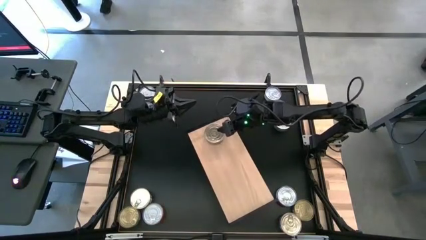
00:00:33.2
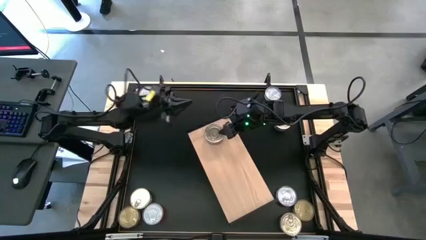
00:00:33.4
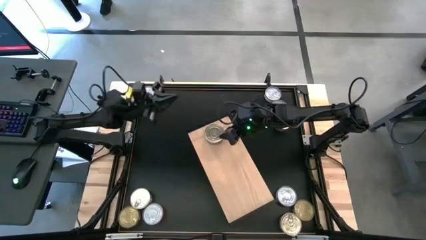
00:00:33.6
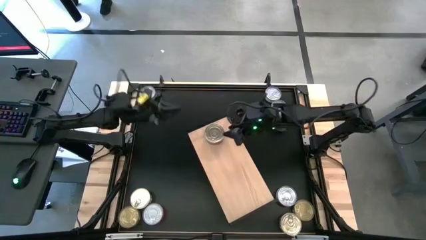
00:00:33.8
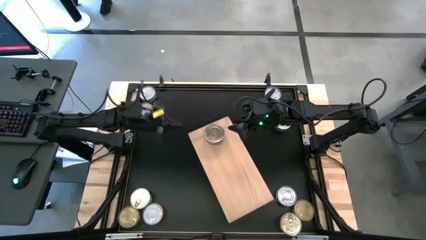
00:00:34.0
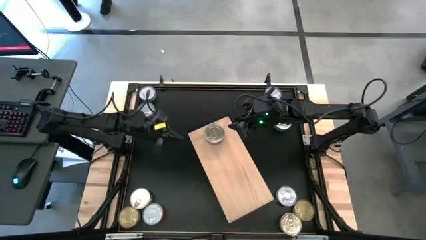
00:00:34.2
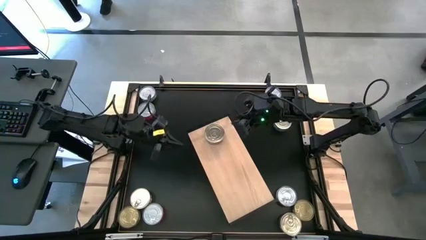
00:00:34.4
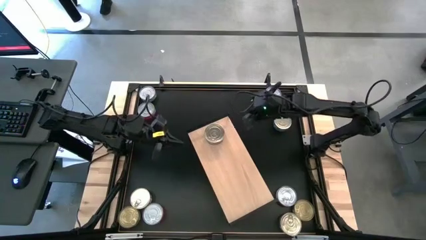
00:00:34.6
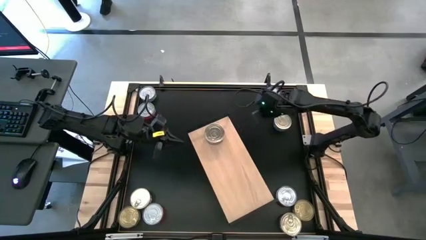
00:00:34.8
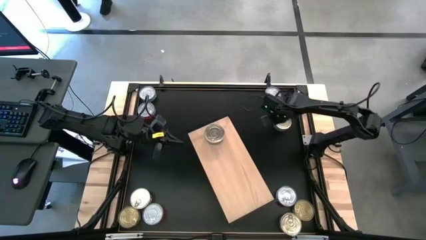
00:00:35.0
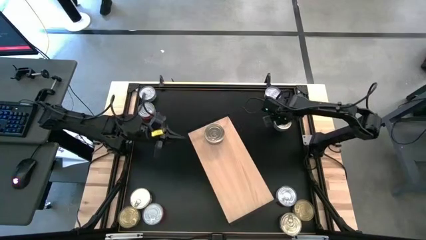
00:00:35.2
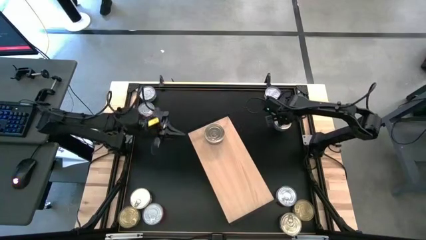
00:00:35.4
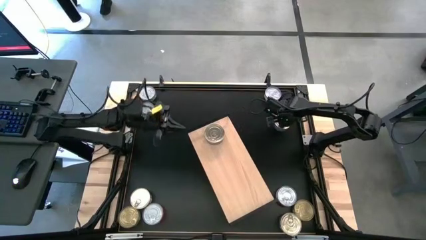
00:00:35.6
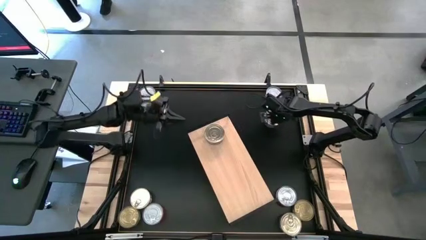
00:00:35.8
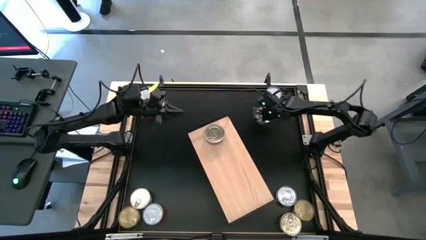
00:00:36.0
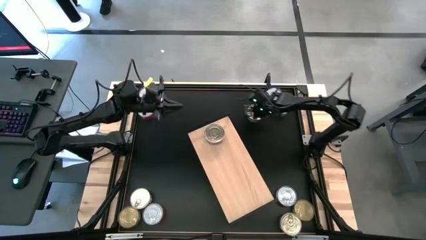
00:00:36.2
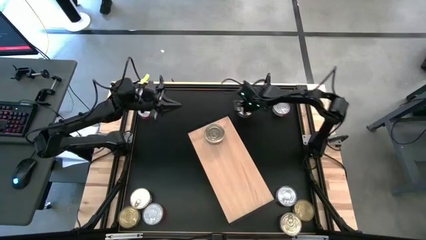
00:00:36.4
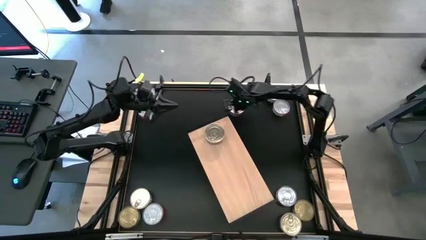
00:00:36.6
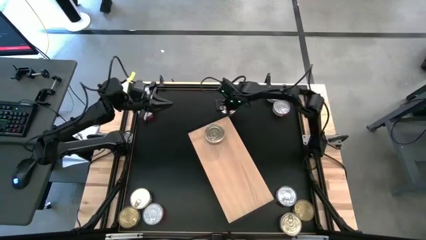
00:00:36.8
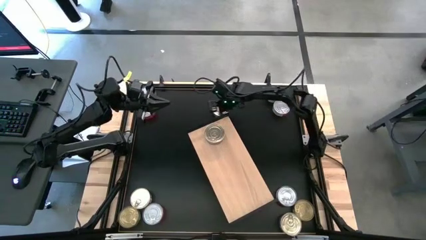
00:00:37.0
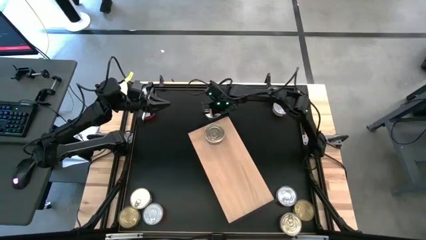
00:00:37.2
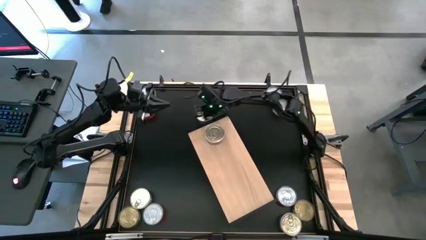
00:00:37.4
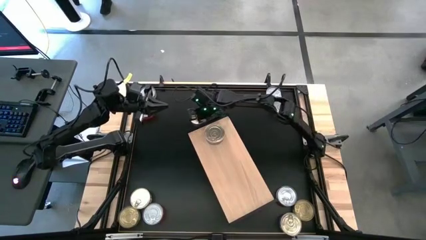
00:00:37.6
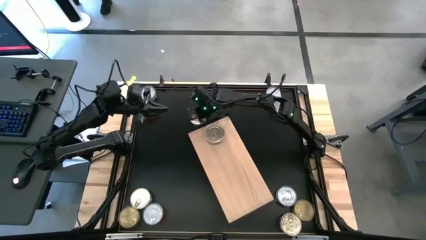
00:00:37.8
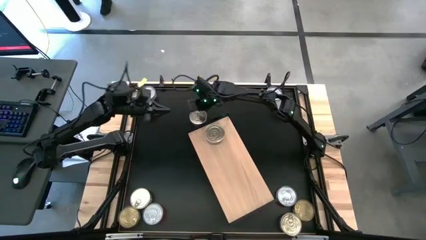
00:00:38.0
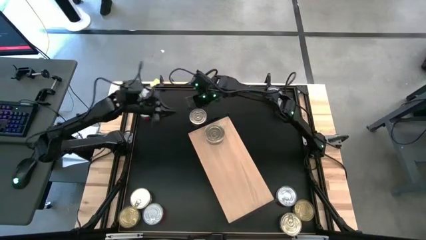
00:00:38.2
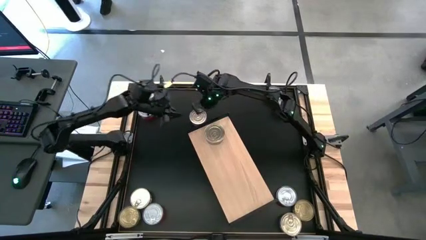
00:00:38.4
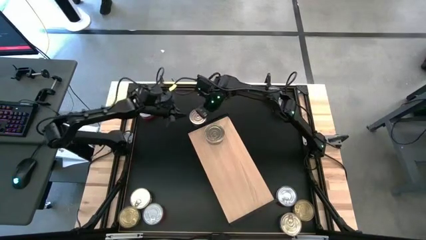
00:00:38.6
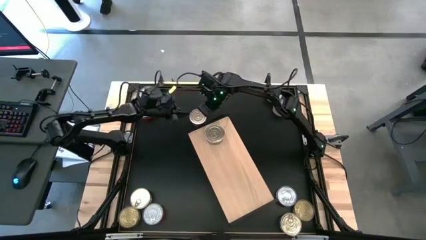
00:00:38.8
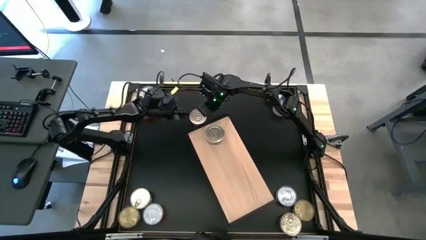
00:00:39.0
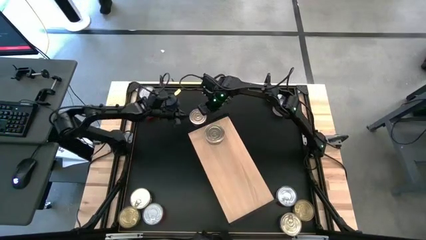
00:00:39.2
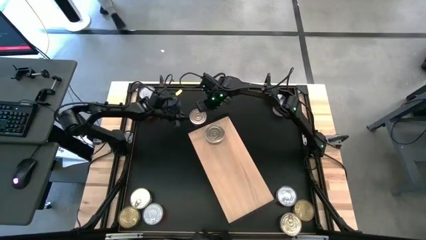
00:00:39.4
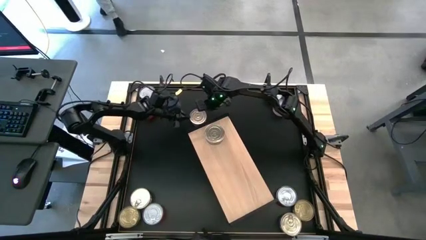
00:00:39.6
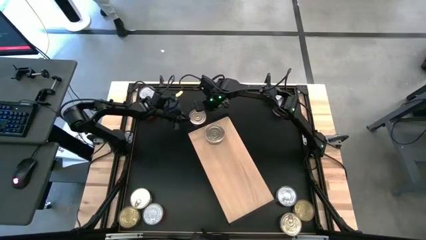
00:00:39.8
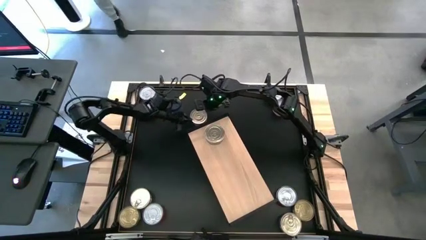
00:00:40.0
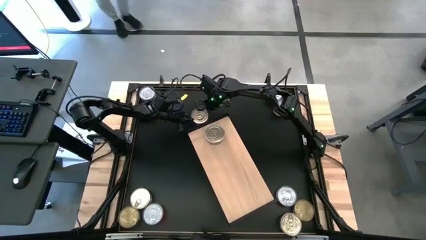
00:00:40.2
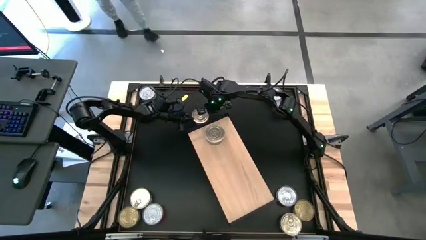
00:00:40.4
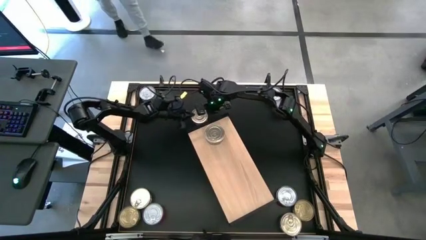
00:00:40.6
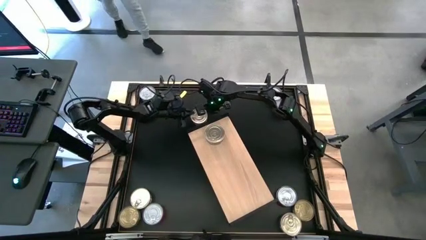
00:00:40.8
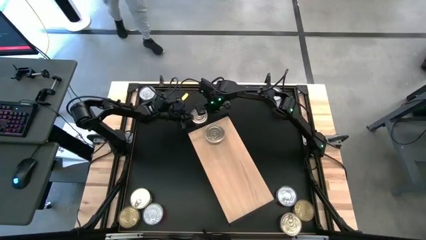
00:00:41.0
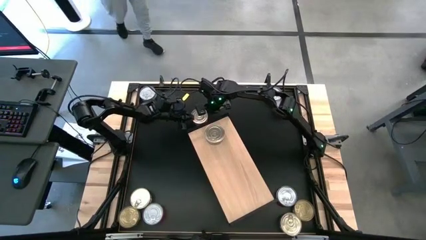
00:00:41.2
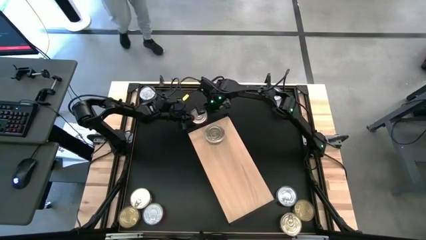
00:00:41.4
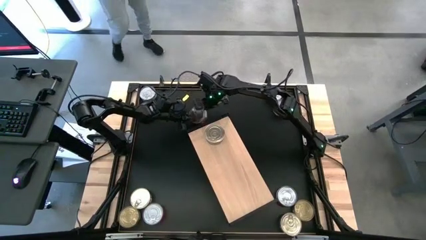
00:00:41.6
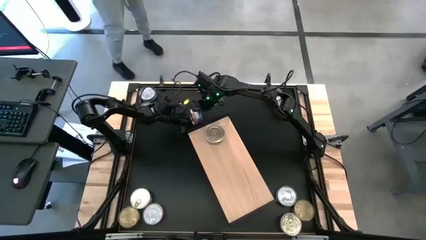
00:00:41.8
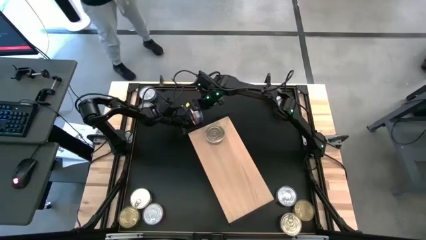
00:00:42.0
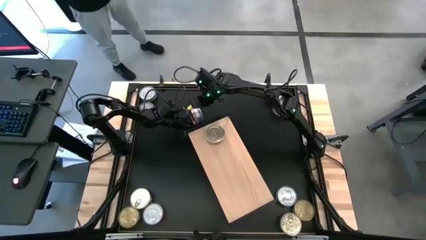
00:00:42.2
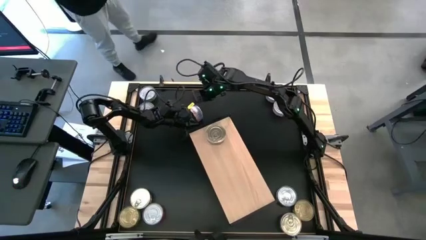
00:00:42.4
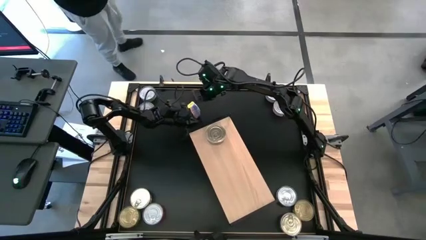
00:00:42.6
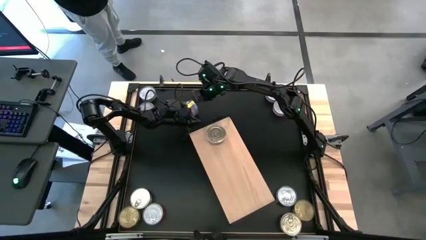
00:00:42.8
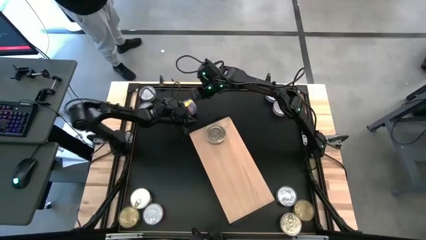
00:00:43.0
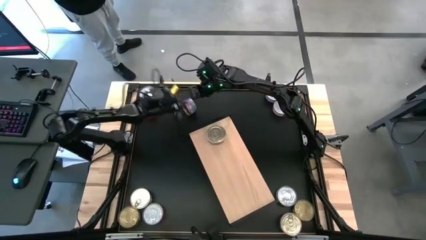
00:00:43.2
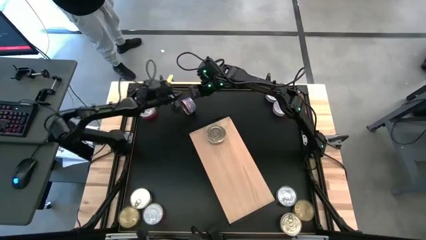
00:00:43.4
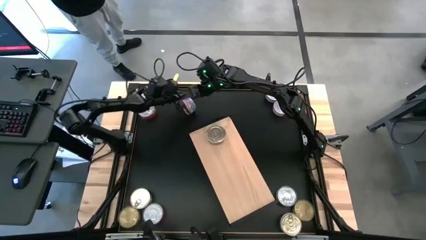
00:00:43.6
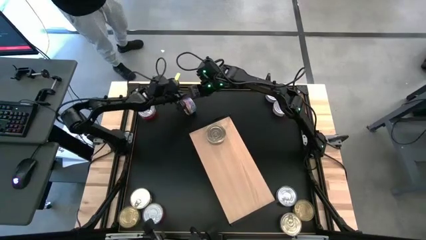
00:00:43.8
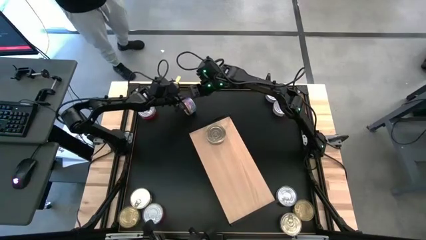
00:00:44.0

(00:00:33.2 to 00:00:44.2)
Task: Stack canned seafood by type on shelf
Stack the blue tuna can on top of blue tuna can on the shelf
